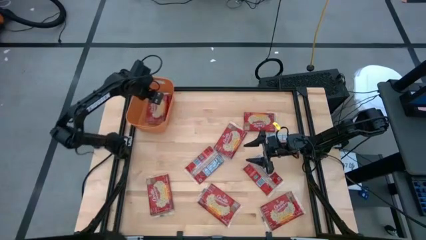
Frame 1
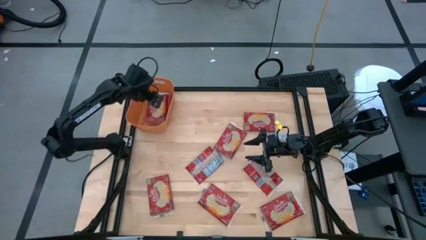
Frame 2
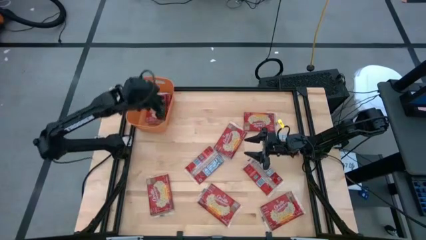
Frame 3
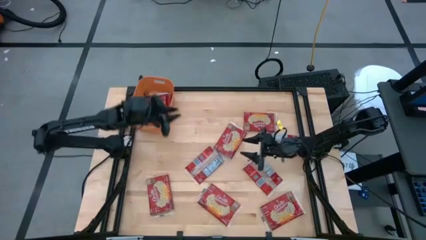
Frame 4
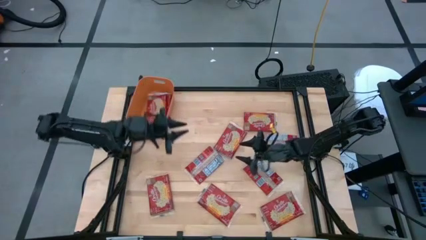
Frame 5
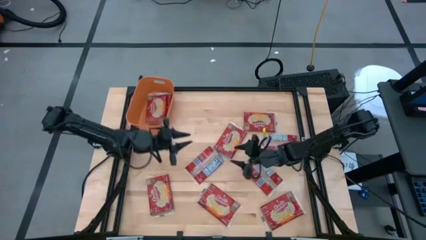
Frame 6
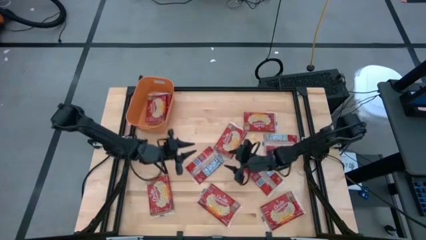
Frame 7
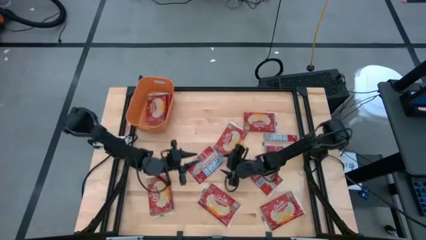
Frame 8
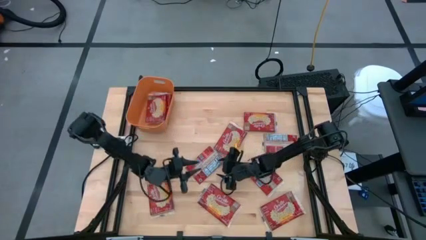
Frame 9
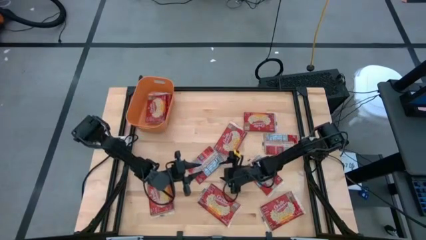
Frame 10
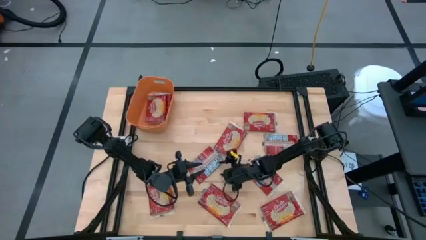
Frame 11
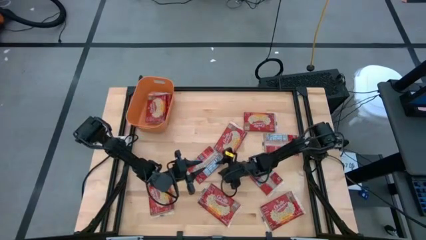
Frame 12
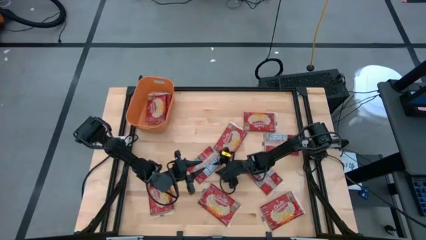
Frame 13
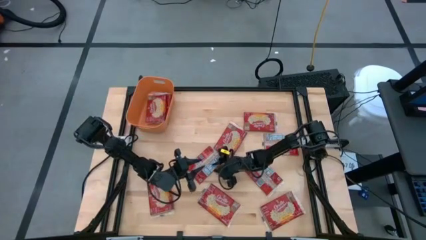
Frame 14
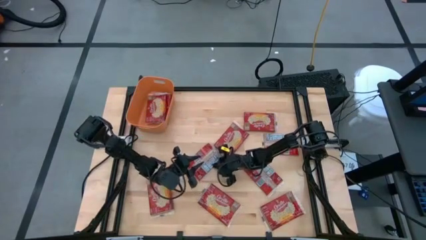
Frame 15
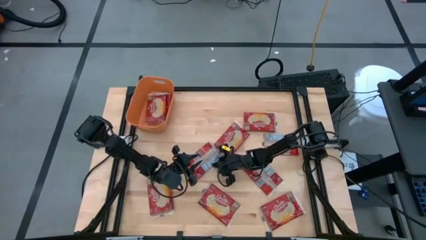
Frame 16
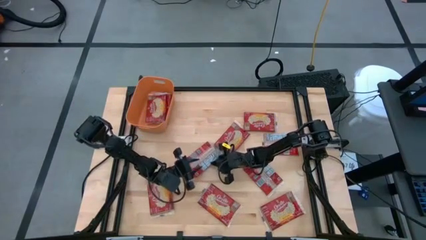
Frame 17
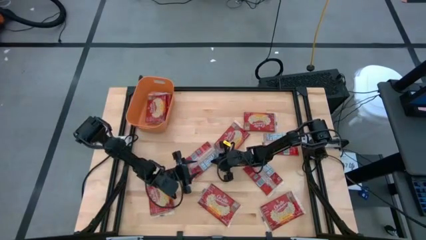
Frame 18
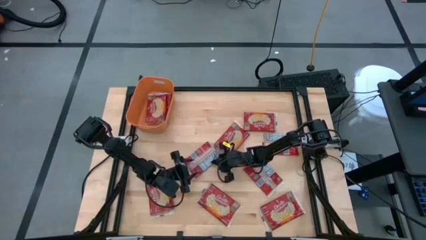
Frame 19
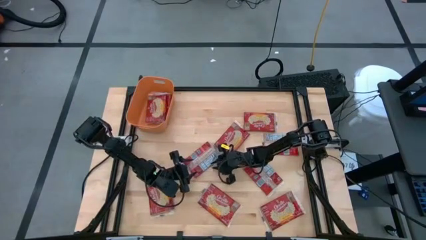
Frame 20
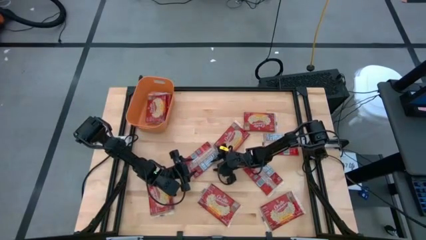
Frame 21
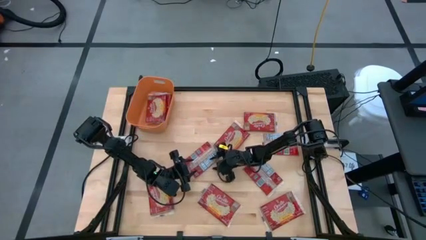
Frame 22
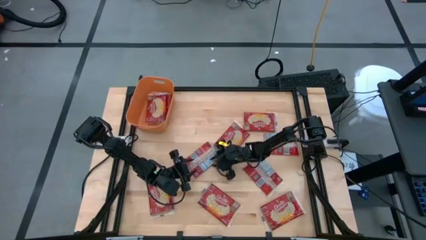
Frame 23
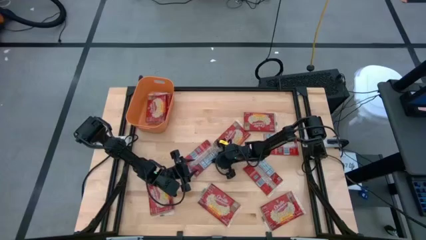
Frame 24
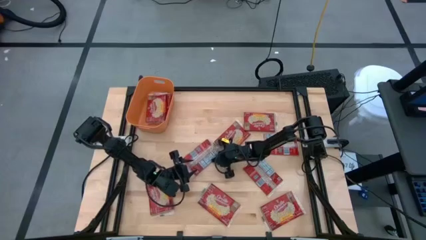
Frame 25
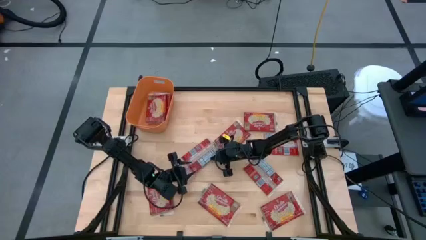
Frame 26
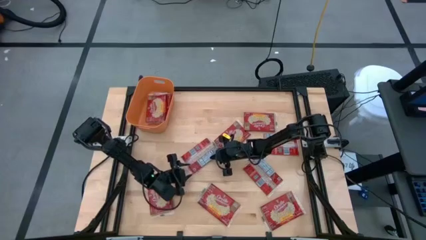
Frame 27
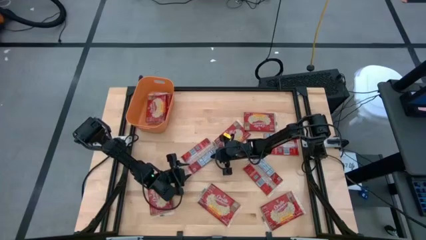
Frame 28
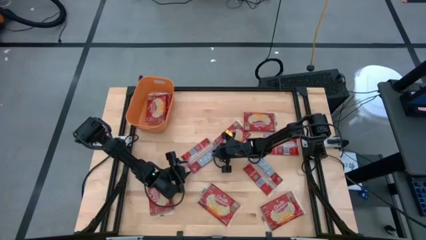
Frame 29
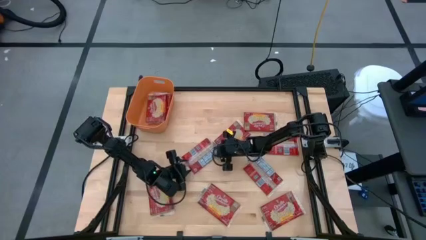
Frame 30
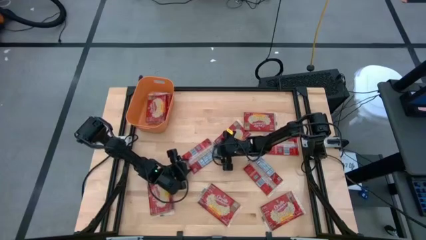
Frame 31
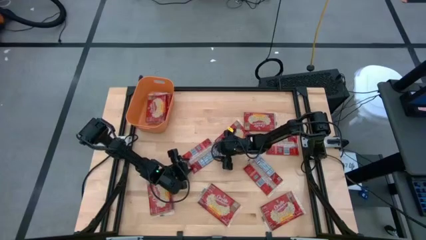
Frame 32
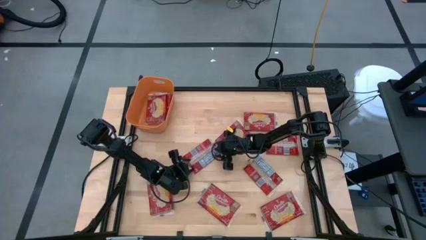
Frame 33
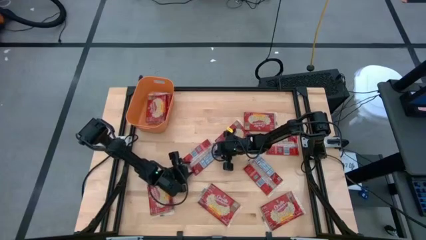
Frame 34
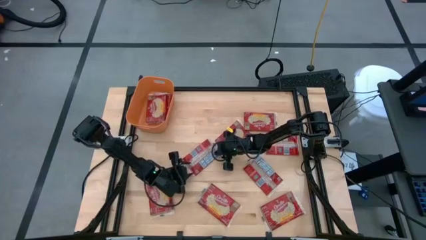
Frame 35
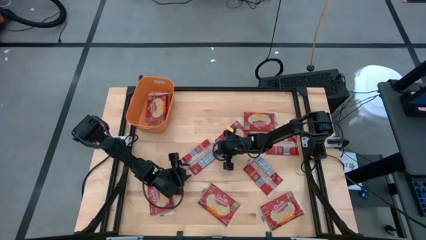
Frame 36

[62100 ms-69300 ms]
Task: Sort popcorn bags into baskets
Put the red popcorn bag into the orange bin

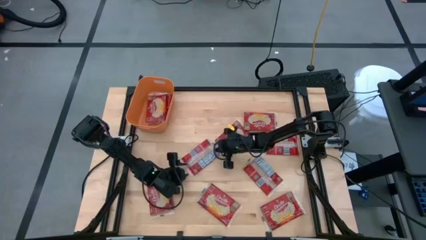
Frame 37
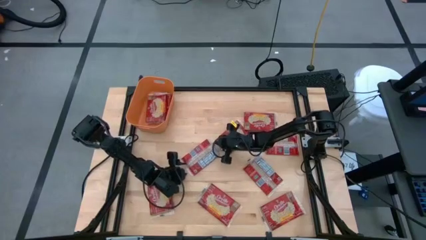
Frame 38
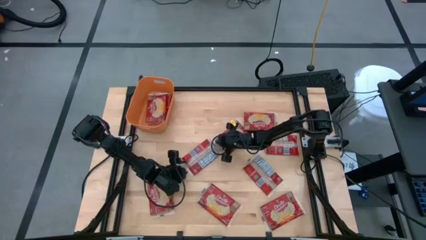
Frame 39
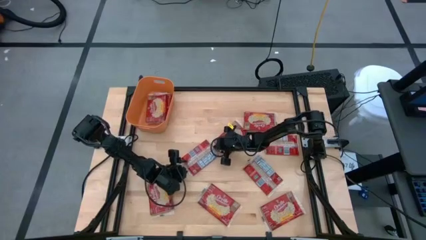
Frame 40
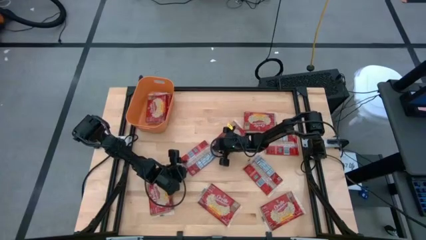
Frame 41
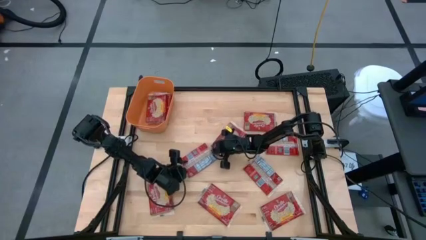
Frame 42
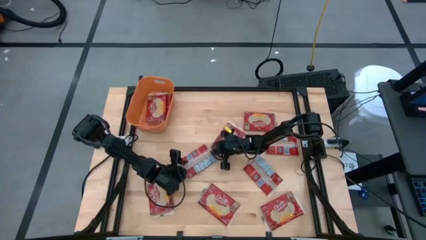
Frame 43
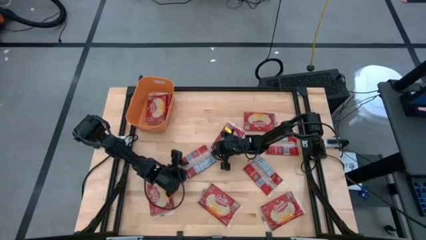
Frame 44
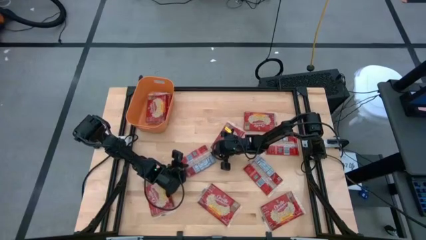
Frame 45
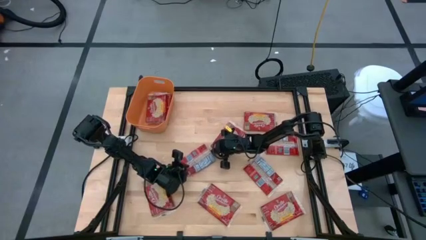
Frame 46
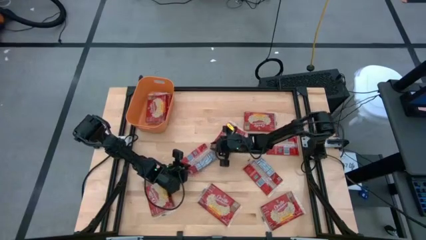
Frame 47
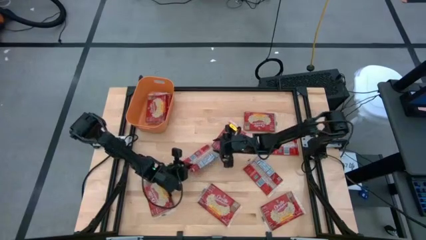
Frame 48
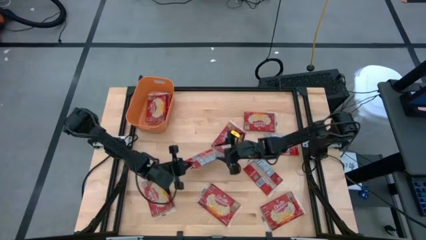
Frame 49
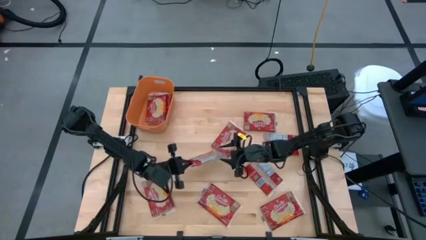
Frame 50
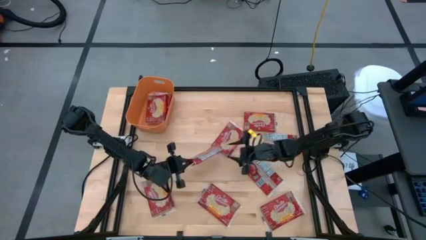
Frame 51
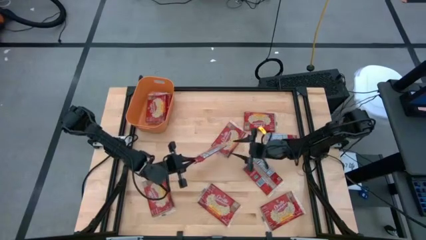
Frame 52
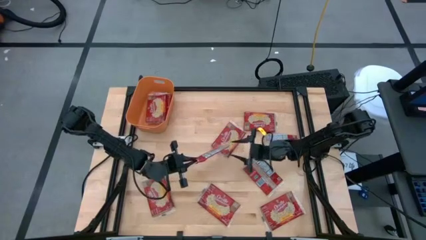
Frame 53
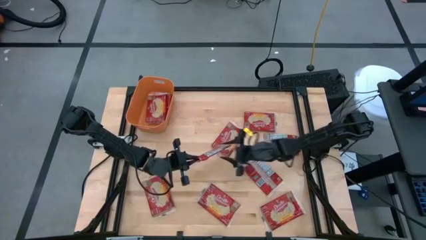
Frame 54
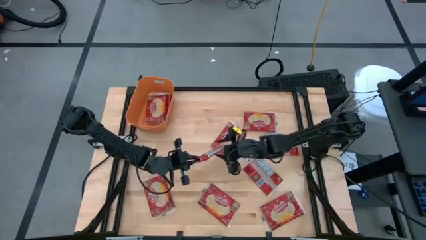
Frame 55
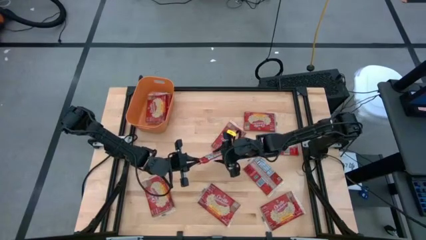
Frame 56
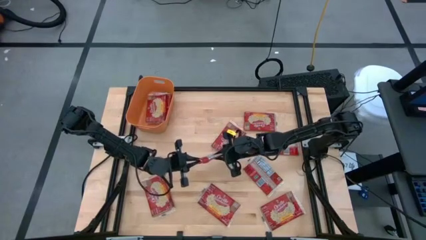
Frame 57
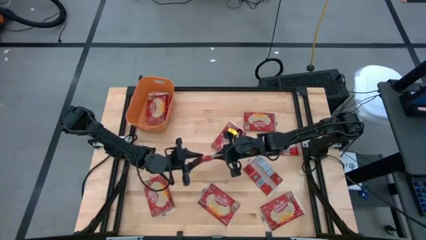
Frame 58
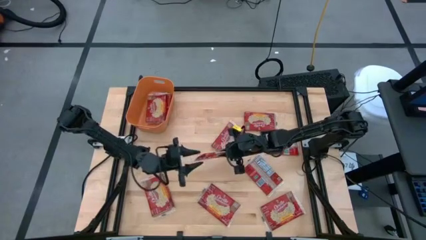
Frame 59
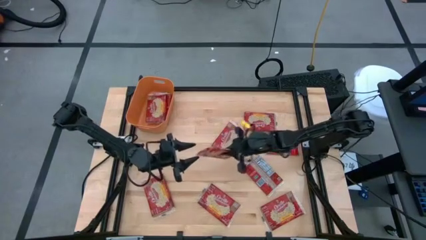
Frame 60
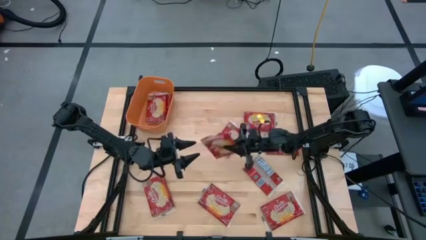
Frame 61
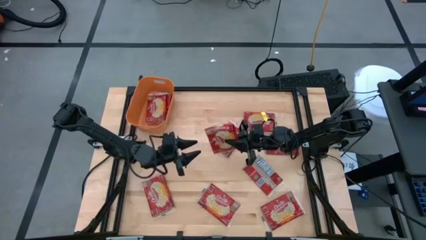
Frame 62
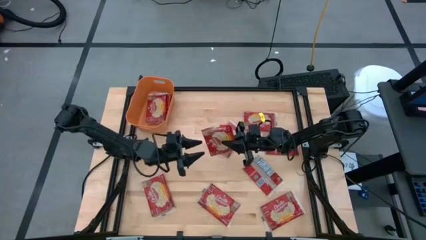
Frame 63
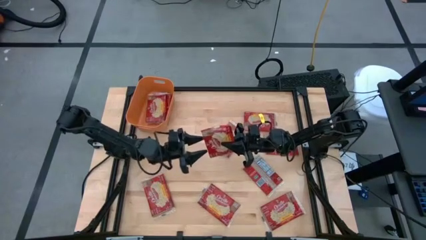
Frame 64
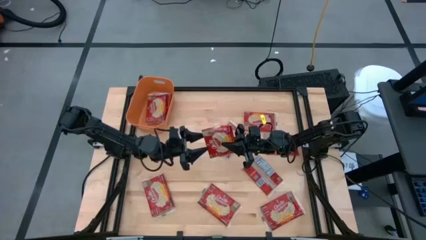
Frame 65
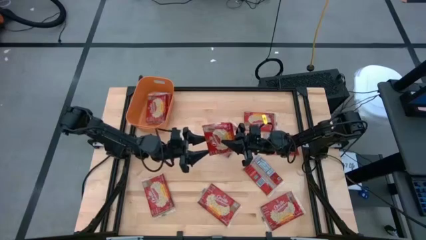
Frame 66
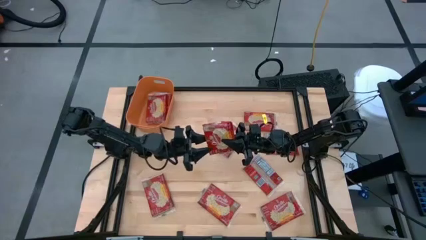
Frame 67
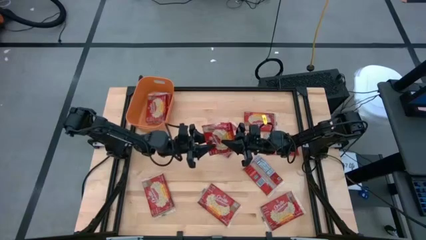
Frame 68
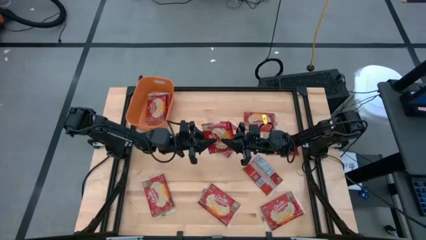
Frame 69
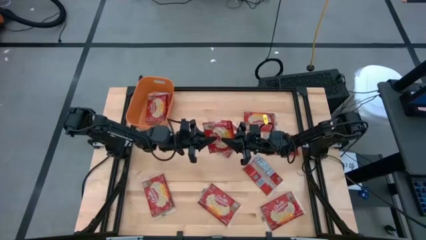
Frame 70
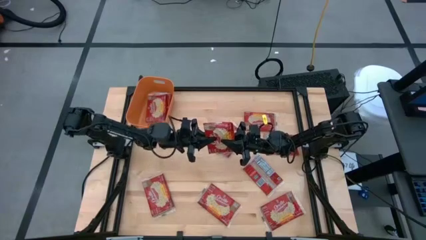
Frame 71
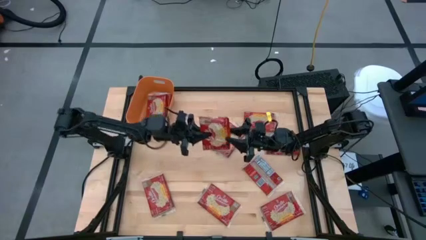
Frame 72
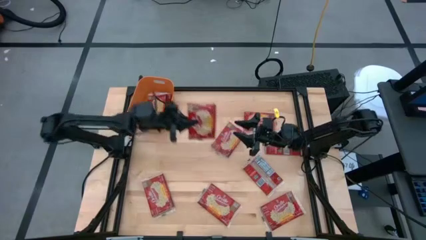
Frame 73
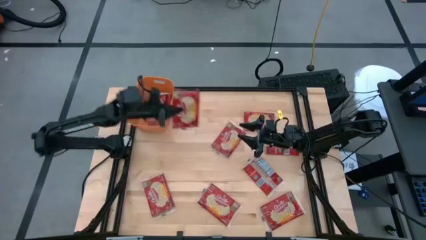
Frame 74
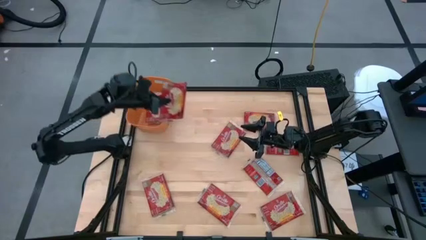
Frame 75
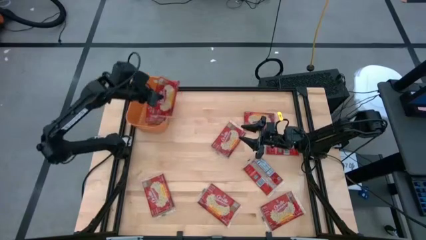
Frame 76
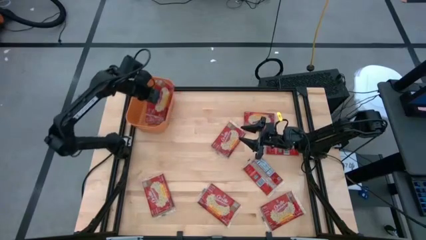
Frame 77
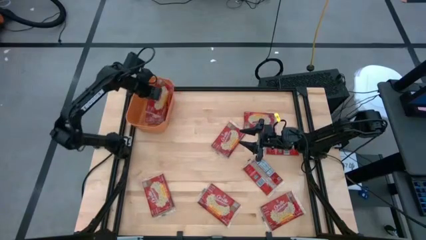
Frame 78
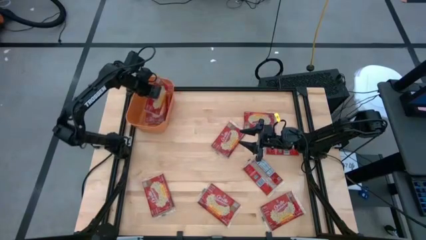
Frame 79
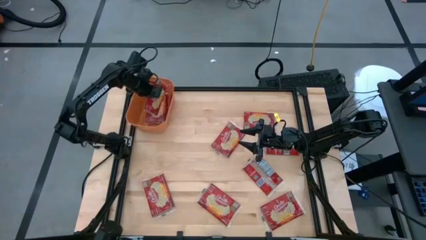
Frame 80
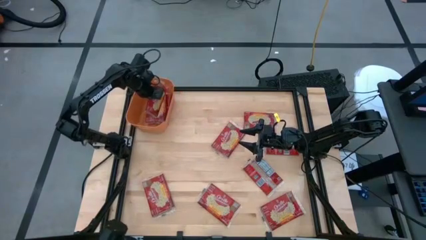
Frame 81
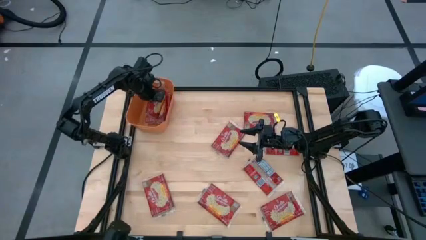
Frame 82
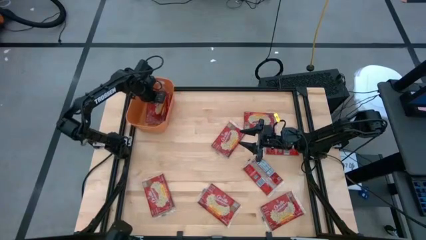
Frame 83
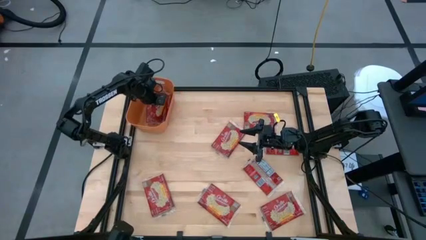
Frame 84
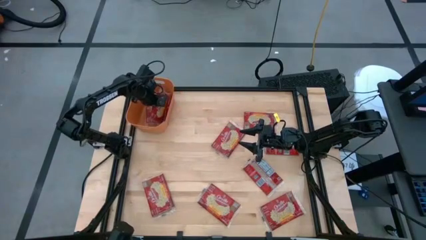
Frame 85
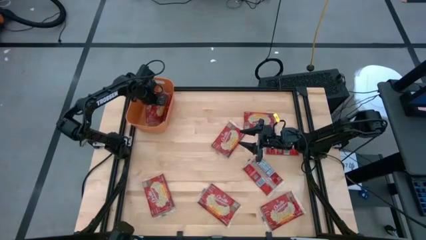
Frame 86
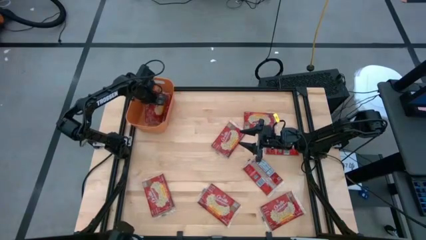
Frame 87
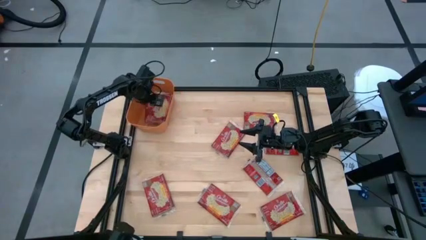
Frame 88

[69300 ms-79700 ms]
Put the red popcorn bag into the orange bin
